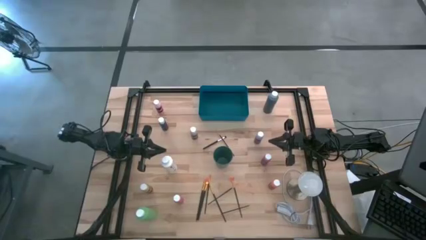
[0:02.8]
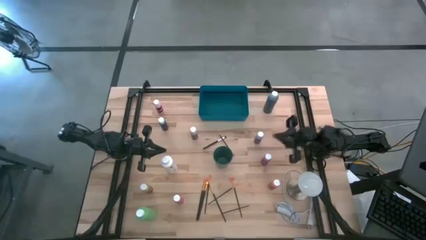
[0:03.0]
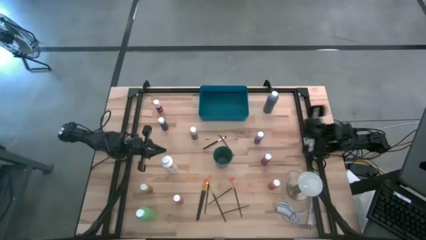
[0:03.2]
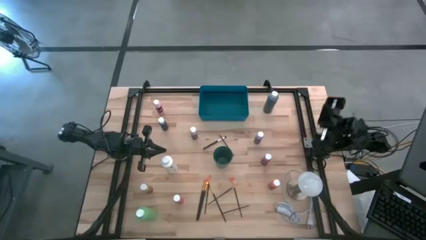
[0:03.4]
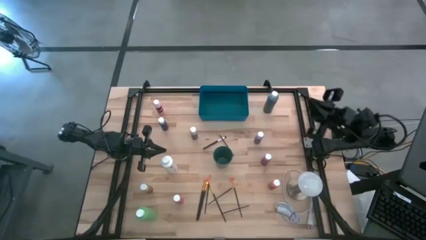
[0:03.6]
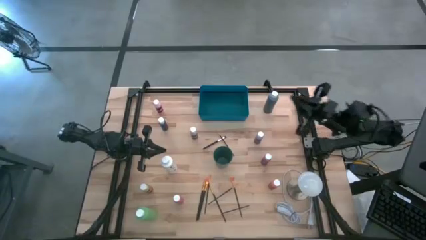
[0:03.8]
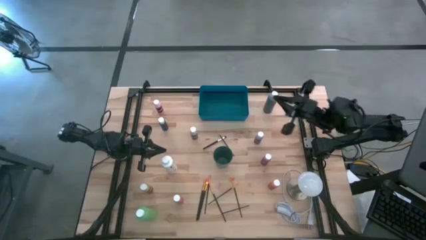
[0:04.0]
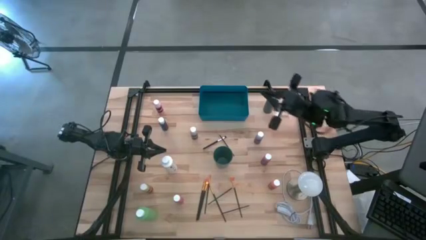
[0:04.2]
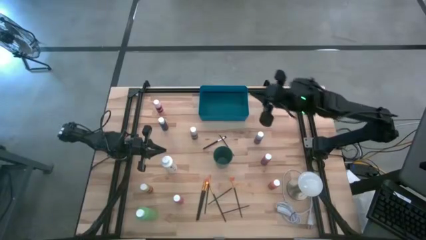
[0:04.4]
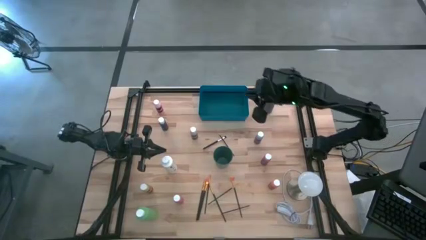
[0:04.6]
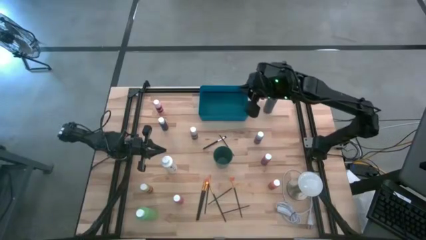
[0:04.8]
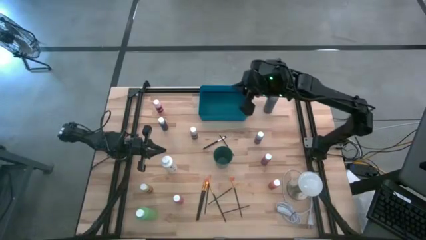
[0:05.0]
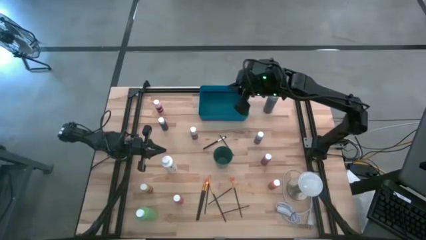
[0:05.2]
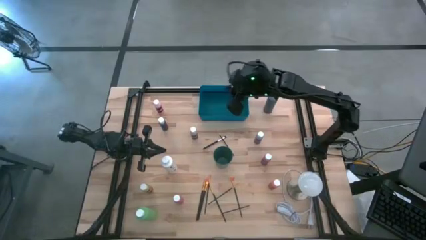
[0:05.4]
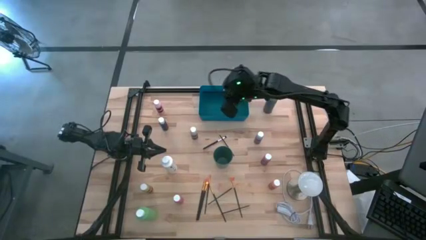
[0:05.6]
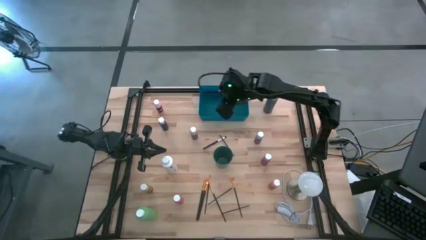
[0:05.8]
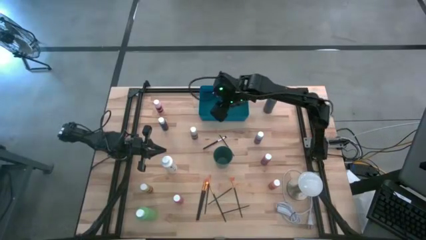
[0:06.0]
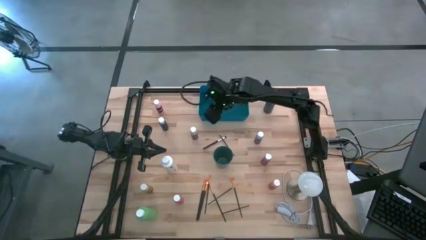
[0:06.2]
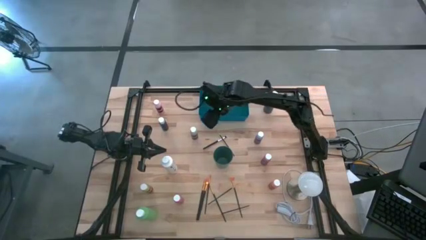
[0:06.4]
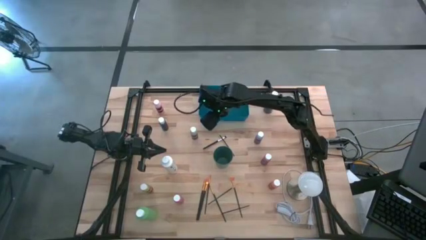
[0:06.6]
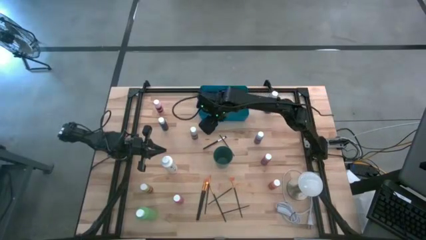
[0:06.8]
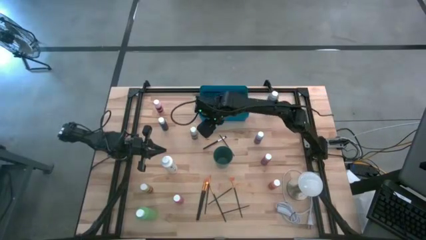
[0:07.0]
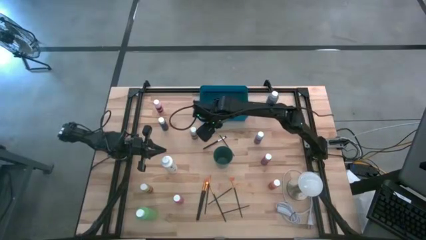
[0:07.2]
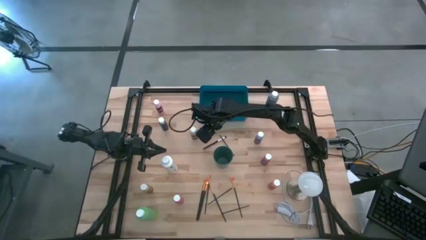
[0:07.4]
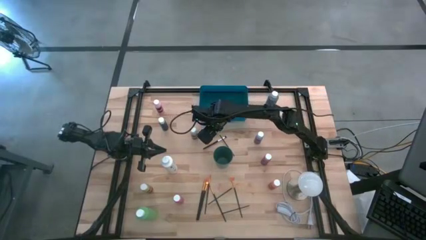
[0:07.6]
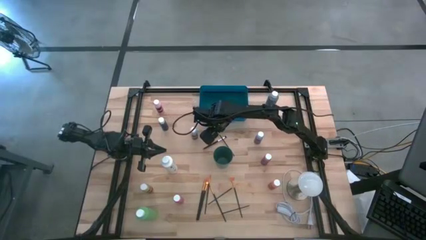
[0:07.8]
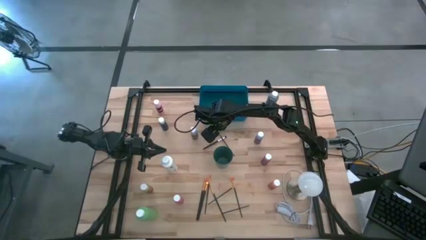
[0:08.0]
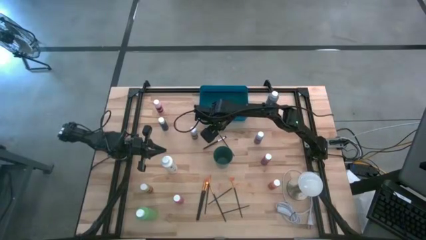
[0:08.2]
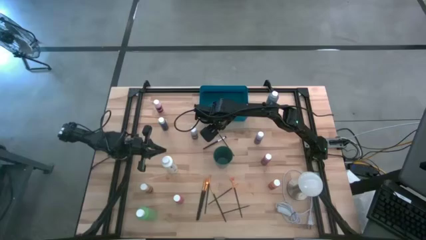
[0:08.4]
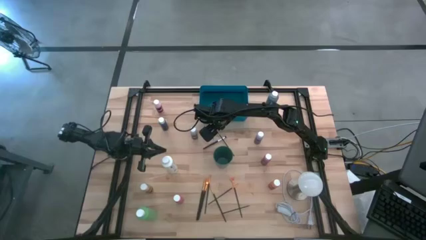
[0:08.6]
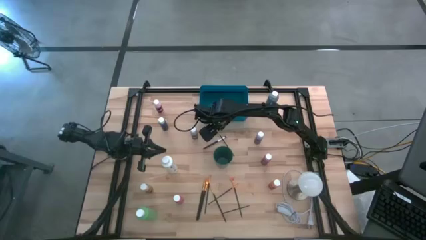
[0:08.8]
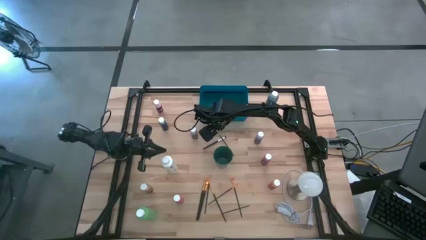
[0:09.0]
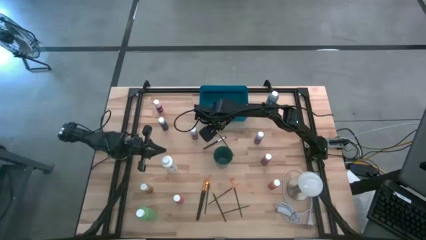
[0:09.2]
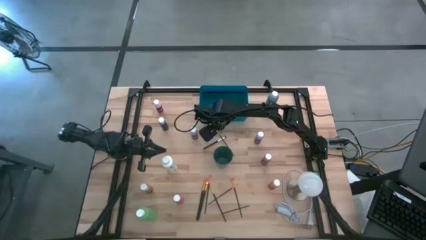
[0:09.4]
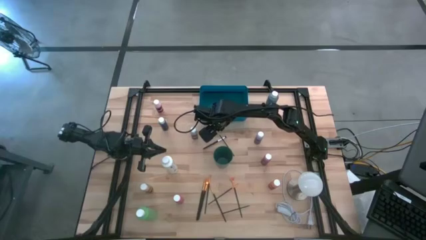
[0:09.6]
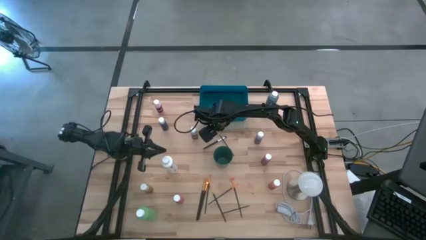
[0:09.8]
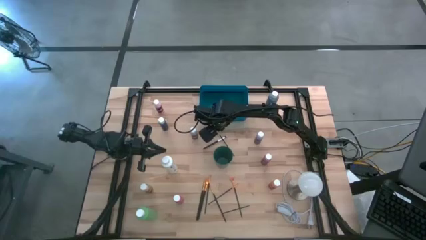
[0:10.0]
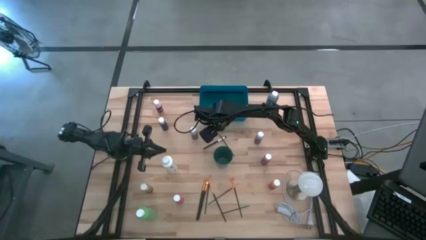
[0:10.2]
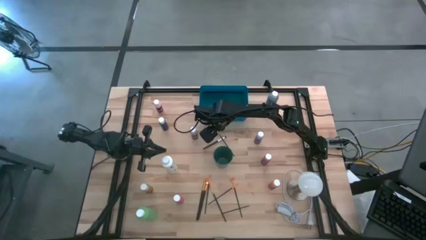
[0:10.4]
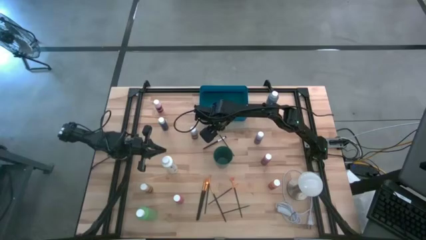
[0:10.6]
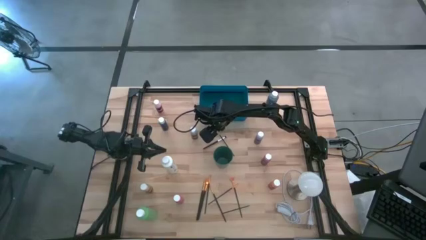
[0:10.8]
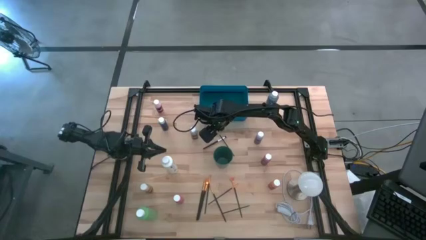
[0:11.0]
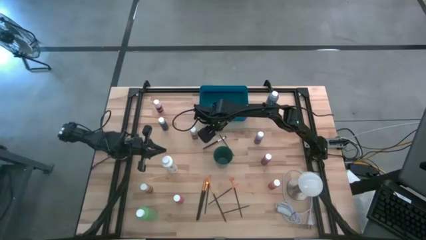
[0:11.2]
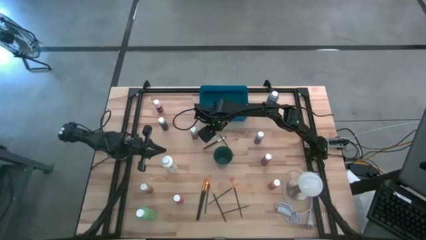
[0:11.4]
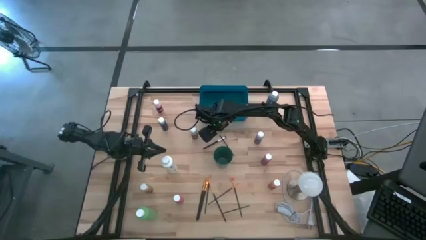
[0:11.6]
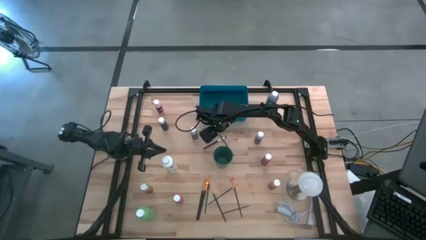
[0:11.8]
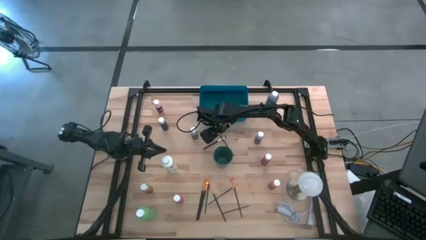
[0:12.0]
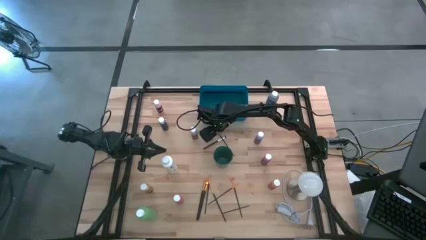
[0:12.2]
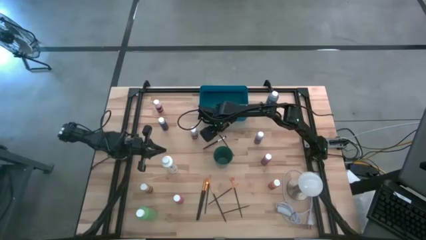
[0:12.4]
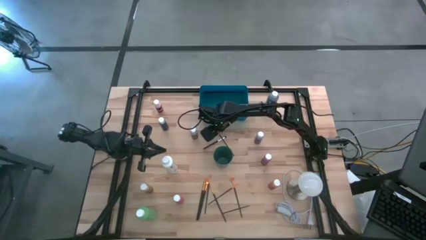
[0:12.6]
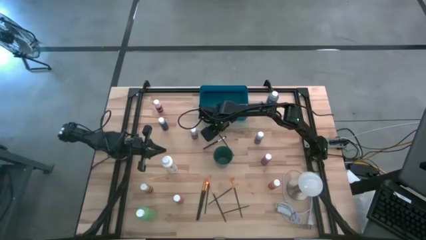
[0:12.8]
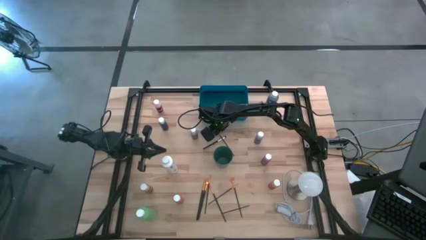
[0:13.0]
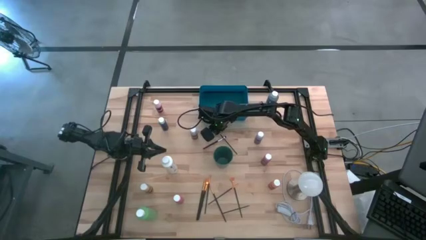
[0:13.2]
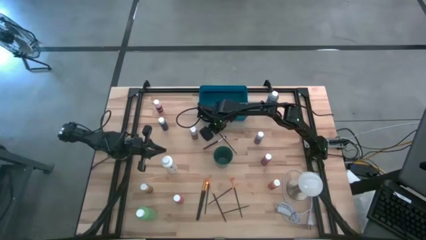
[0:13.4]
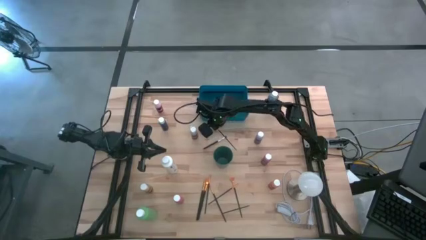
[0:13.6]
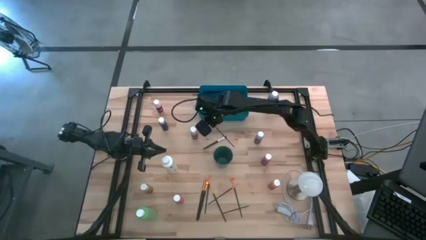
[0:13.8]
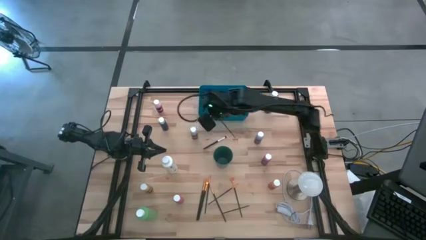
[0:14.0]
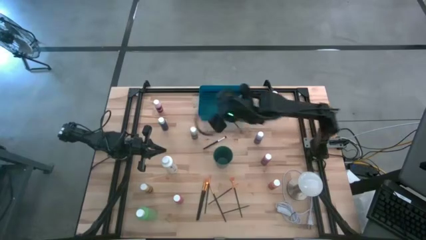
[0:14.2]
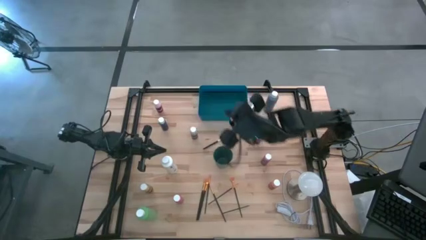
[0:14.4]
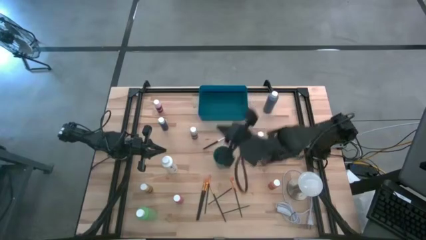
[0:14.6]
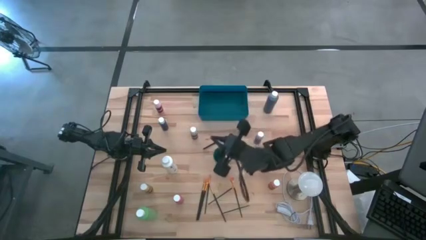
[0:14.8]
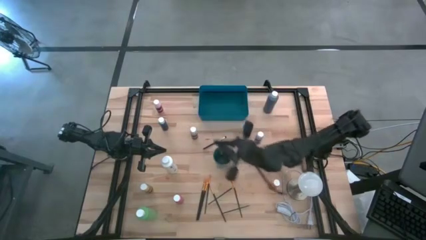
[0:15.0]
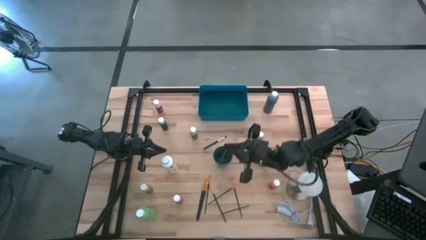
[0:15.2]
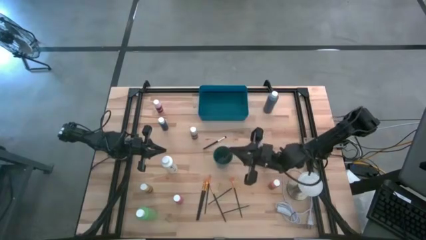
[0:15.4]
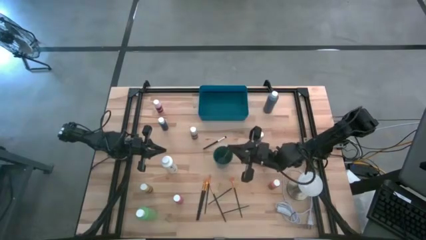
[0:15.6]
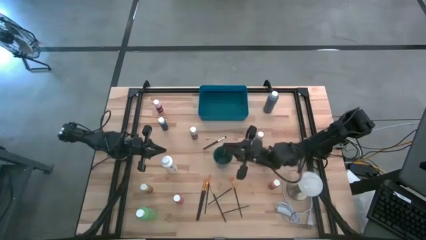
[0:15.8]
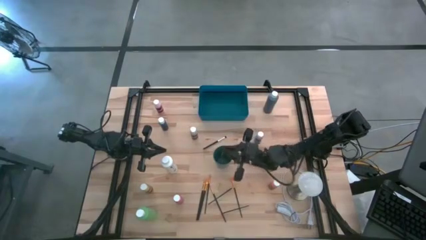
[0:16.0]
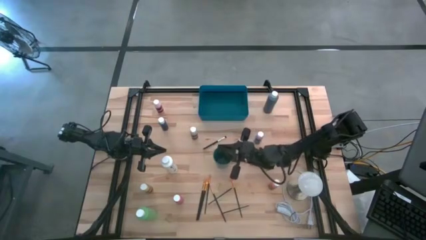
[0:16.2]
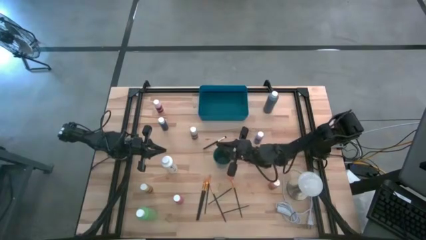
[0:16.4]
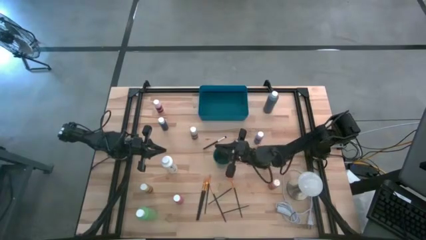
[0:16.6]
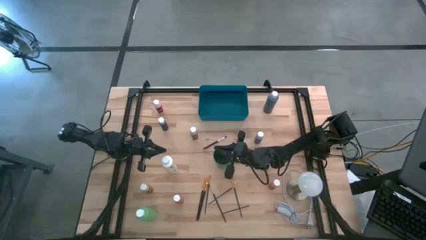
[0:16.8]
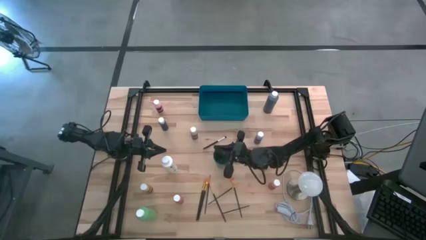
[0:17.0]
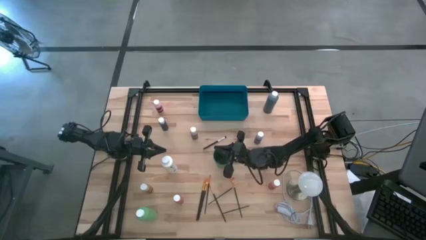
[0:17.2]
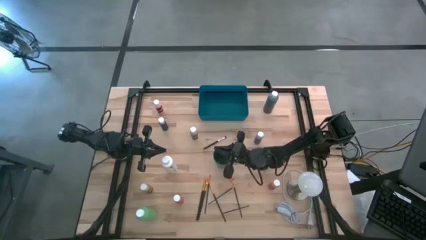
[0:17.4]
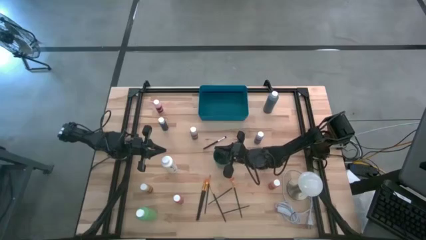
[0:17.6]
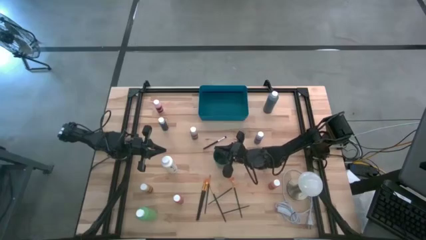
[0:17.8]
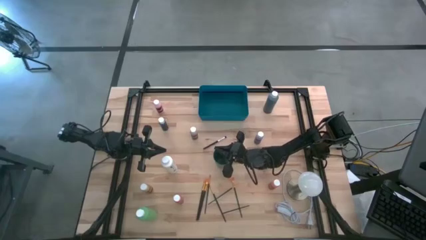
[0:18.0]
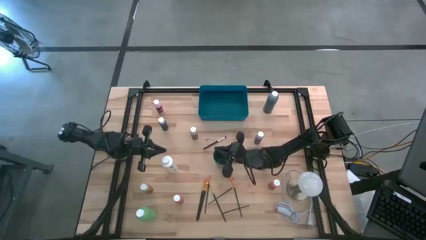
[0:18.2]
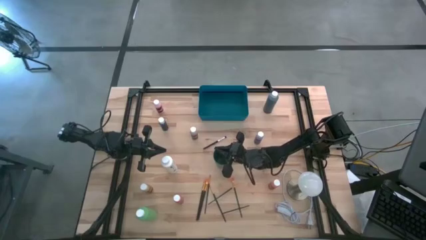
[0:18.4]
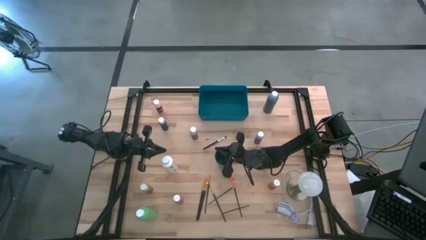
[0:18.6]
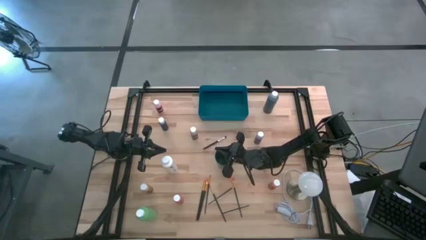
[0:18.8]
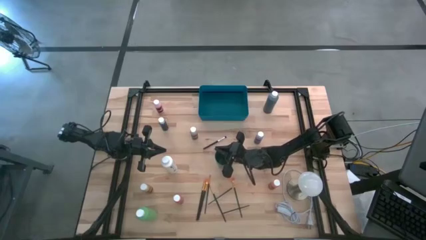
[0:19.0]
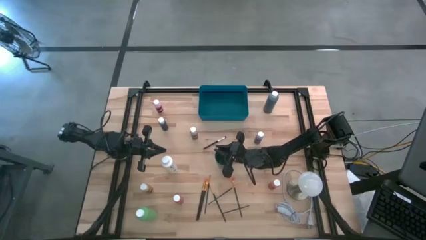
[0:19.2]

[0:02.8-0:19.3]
Task: Pick & Place Paint Supplies
Put the yellow paint brush into the green cup
